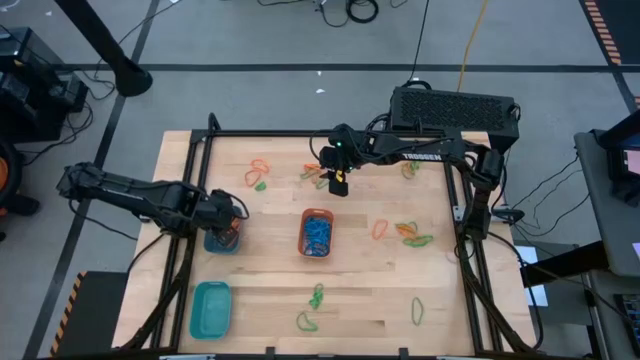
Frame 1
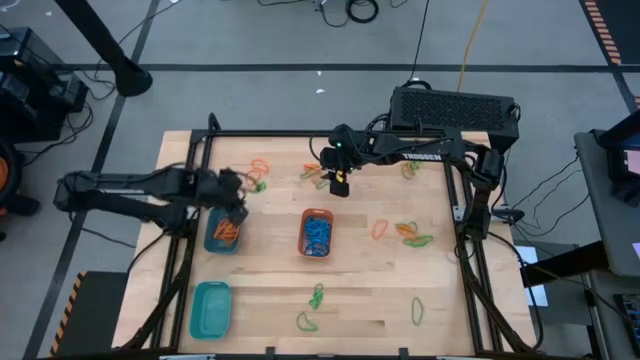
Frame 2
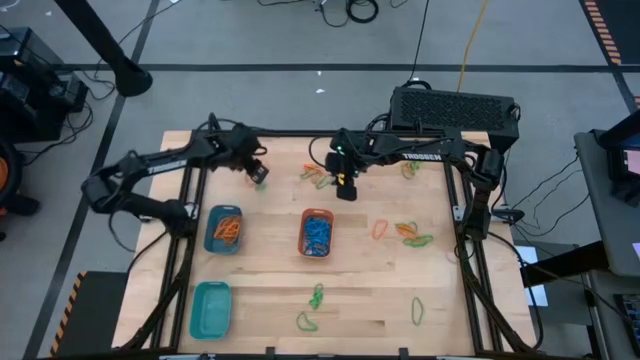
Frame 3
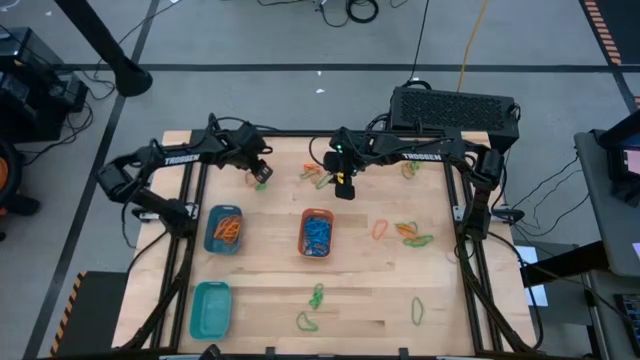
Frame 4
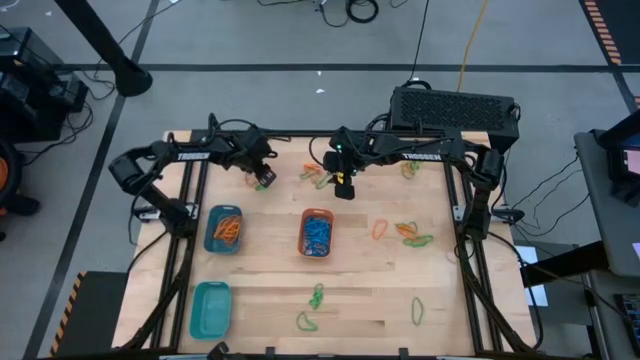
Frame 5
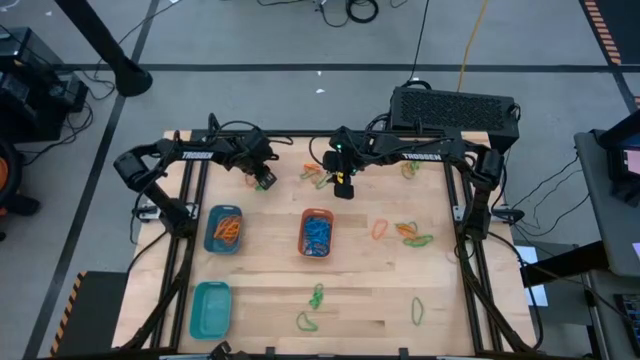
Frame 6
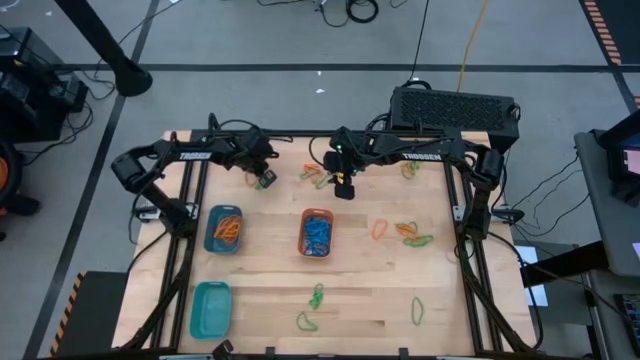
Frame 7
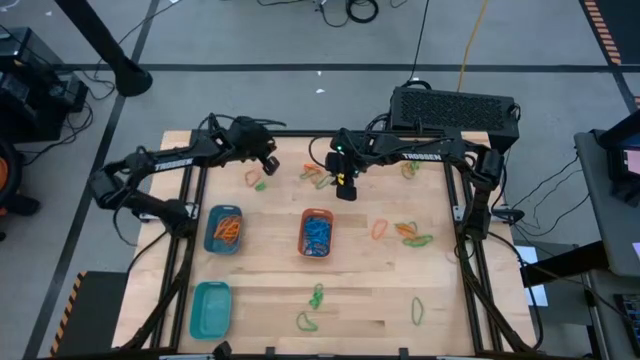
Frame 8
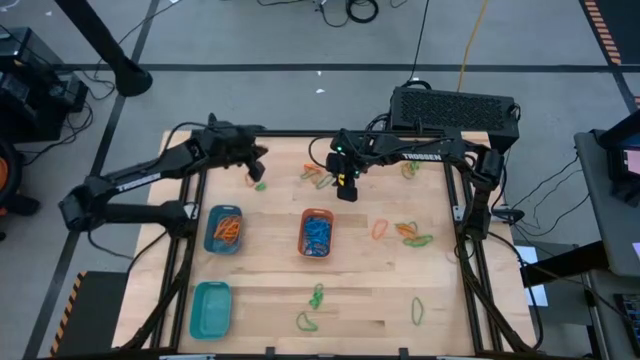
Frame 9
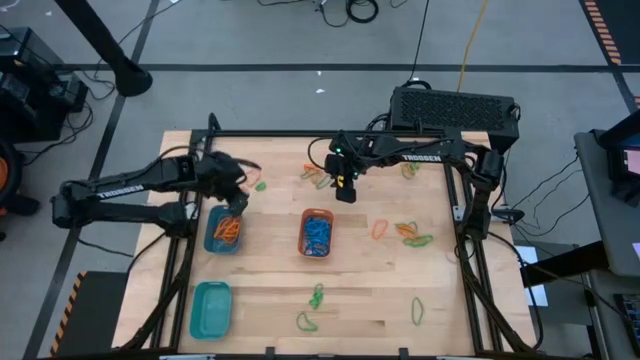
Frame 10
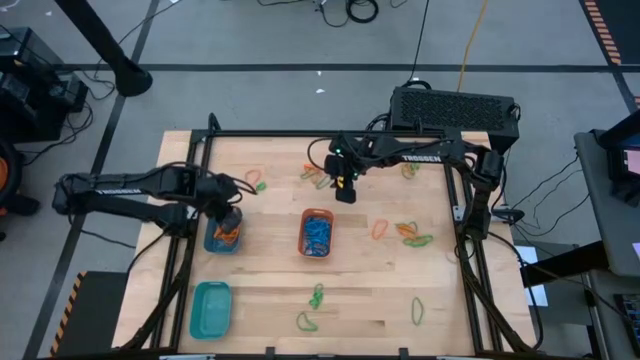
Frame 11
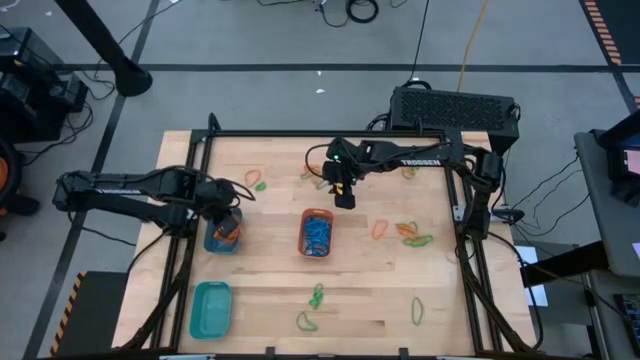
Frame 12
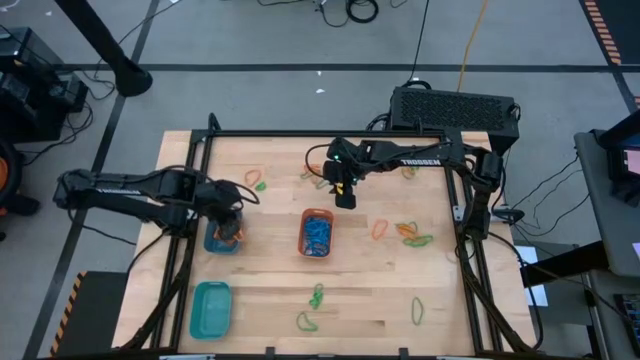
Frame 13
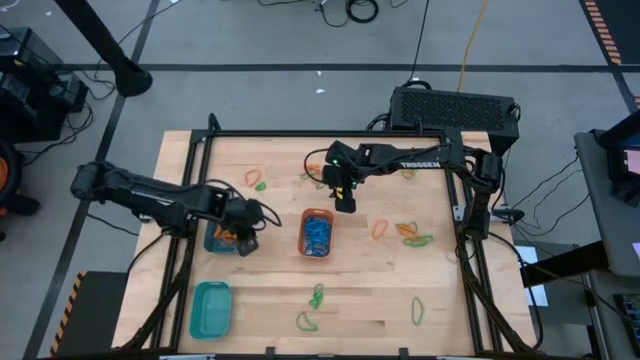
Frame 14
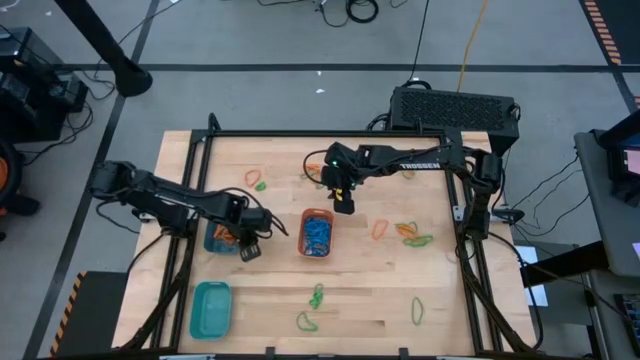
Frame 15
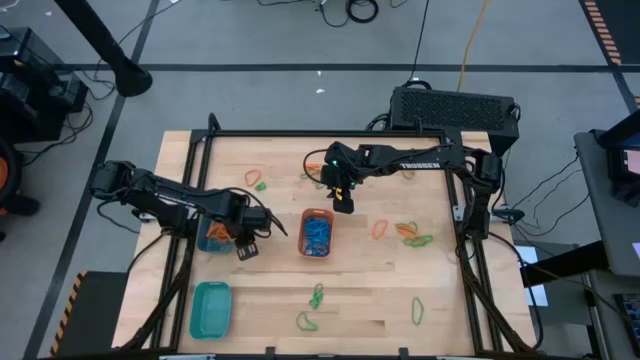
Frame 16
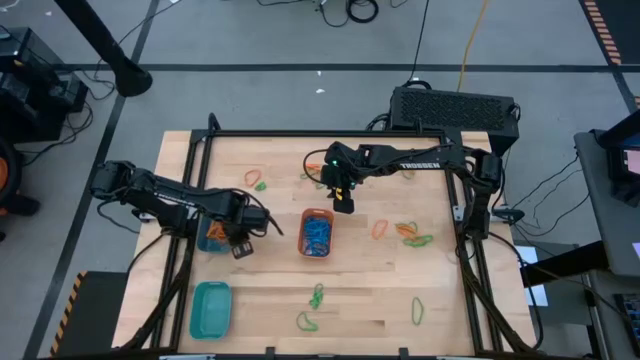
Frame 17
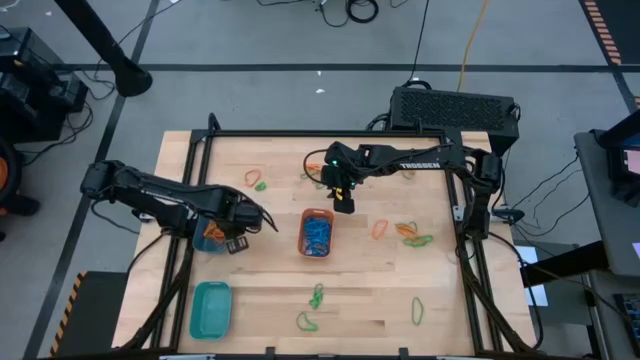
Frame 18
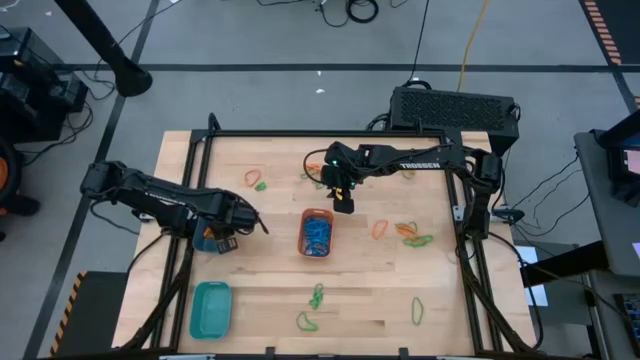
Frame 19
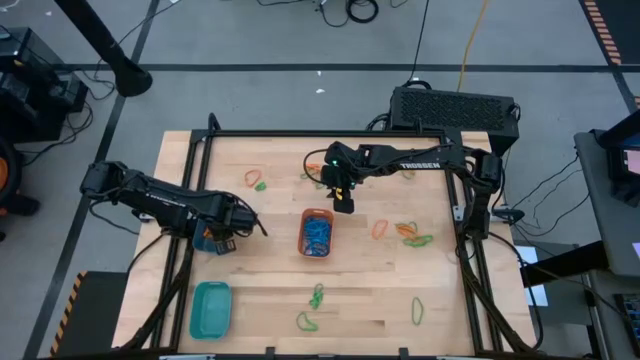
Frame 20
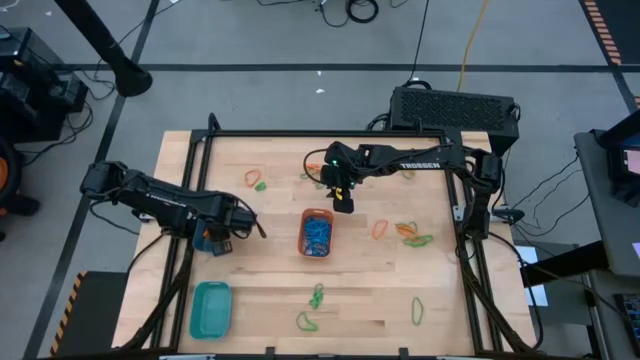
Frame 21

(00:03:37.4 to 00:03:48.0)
Task: Sort rubber bands into baskets
Put the orange rubber band into the blue bin

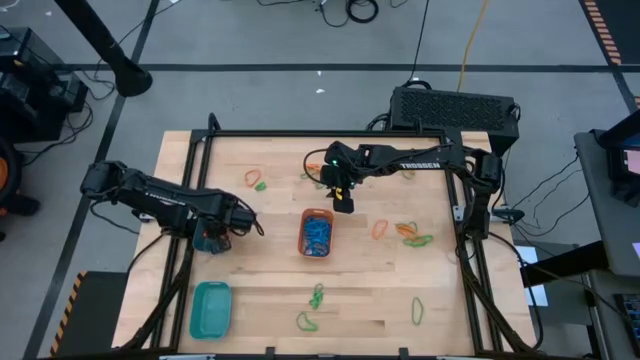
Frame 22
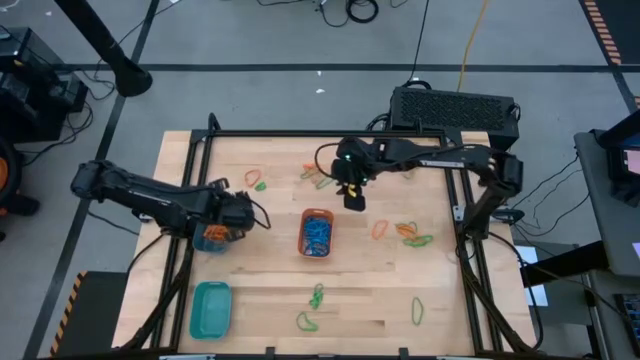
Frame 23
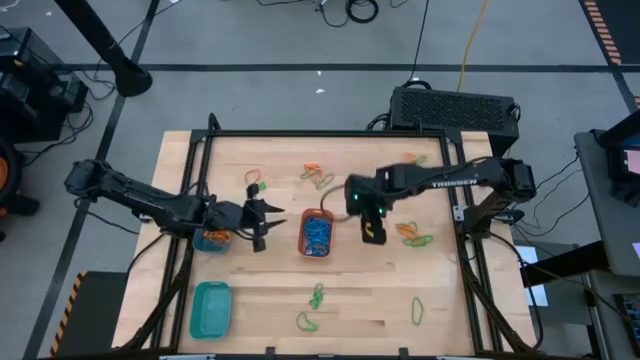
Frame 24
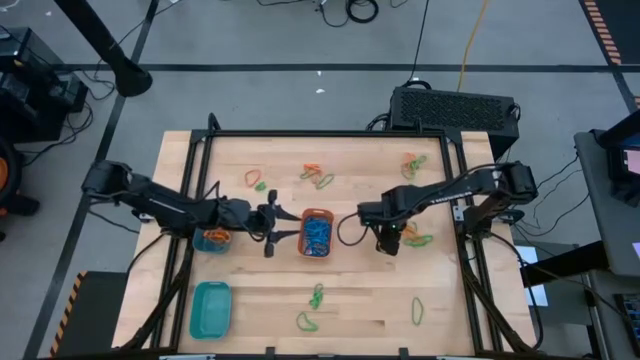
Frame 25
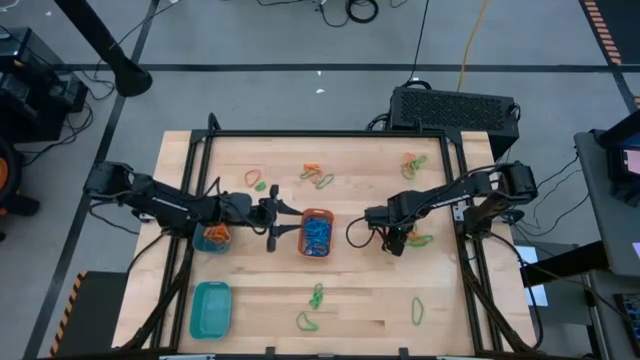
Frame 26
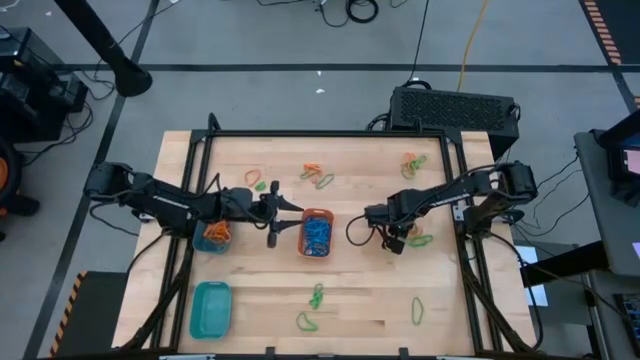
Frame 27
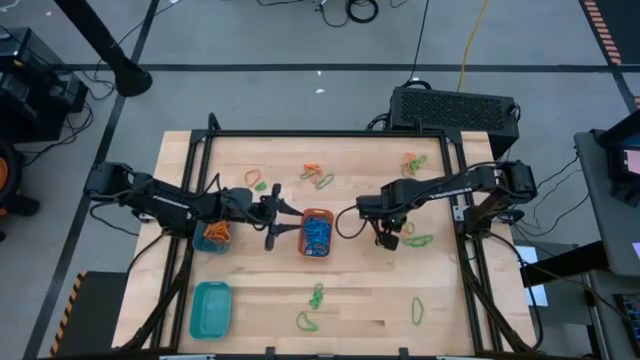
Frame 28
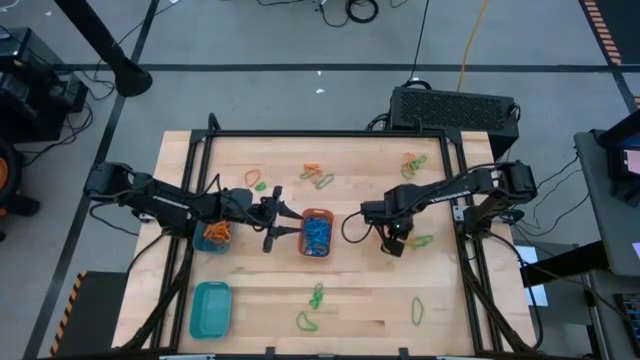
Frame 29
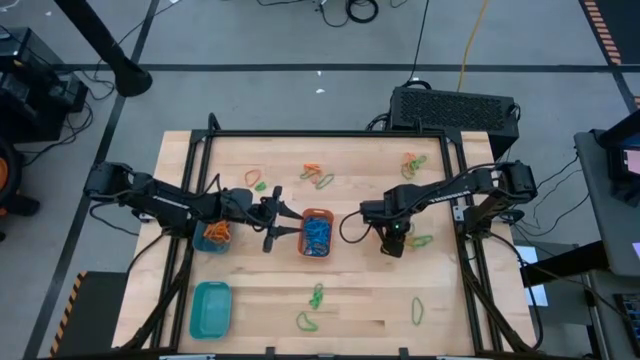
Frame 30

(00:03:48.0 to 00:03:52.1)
Put the orange rubber band into the blue bin

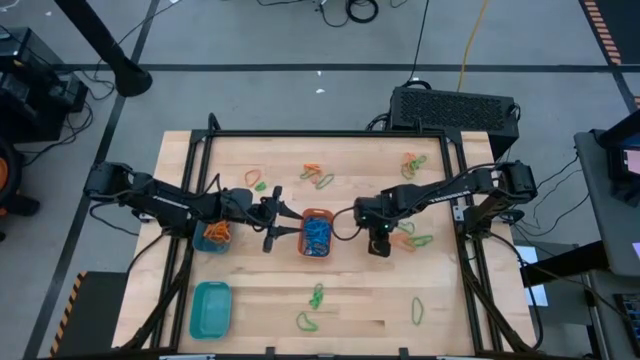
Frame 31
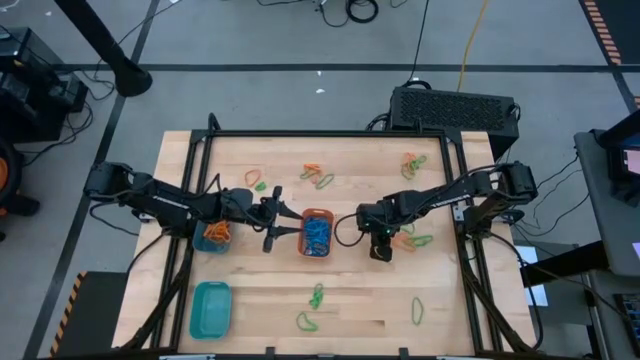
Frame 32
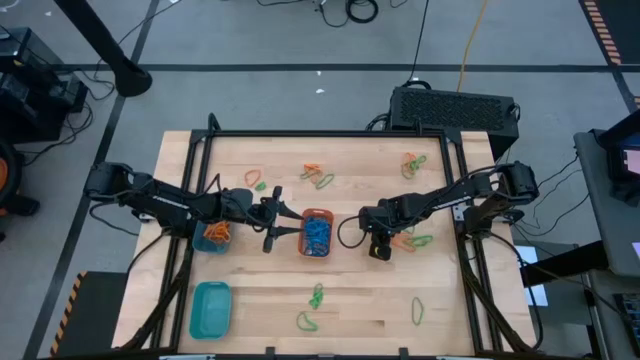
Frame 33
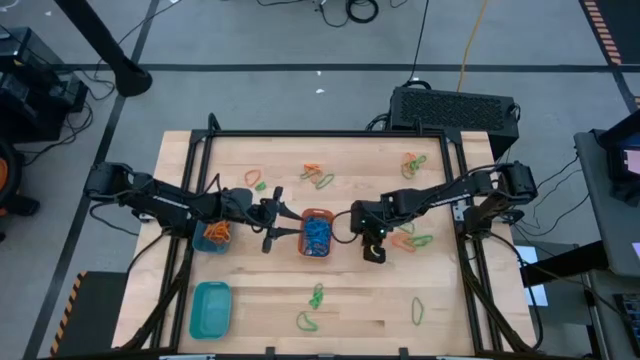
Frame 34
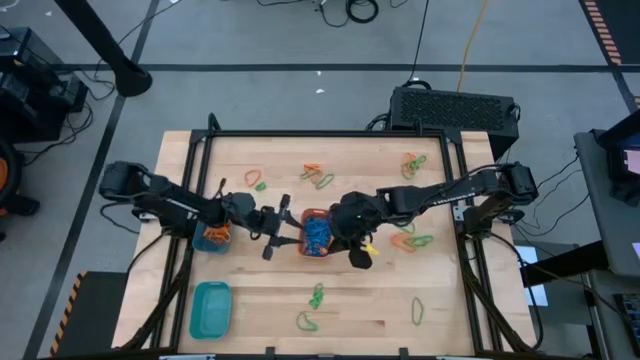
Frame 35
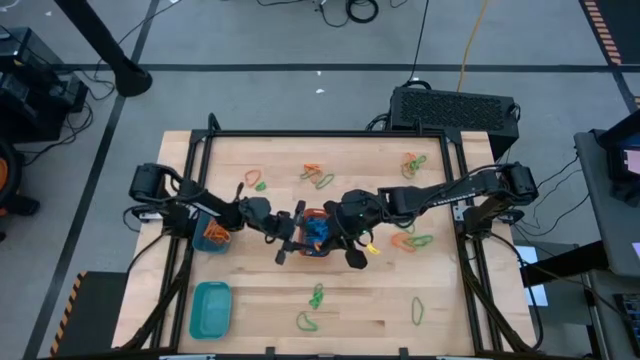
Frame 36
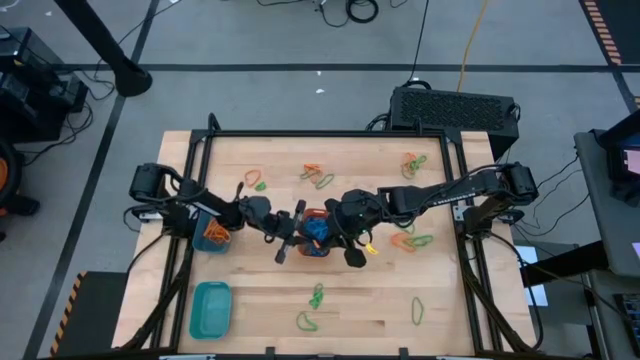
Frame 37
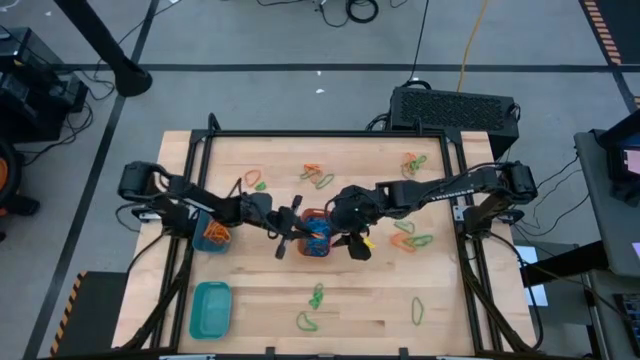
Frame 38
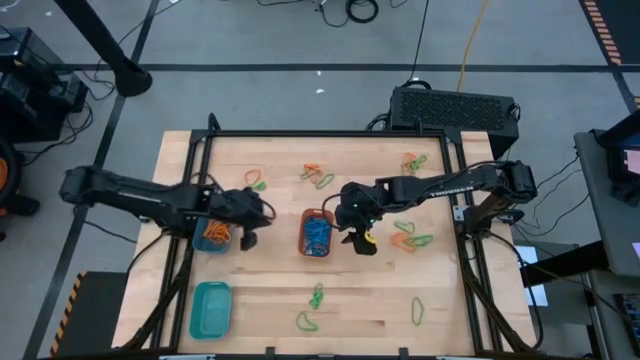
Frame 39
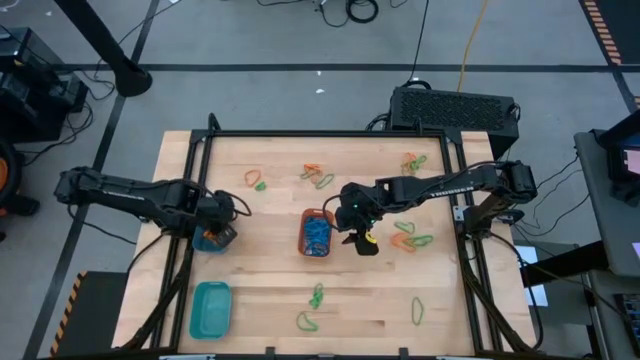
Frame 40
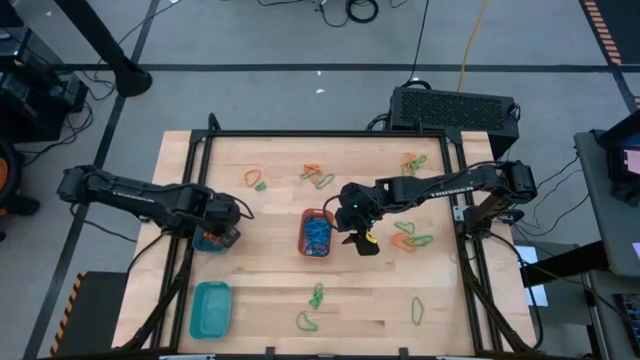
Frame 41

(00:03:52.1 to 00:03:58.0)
Put the orange rubber band into the blue bin
